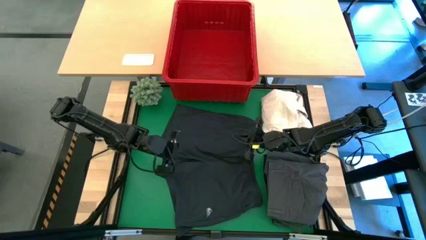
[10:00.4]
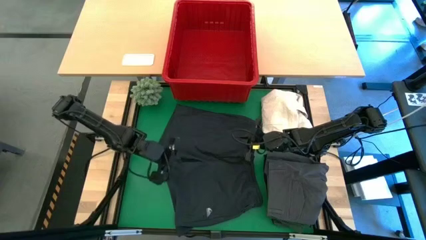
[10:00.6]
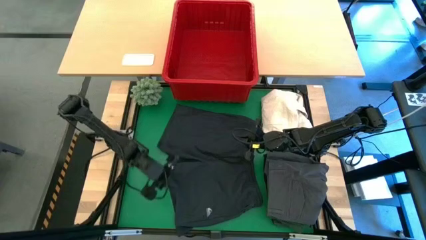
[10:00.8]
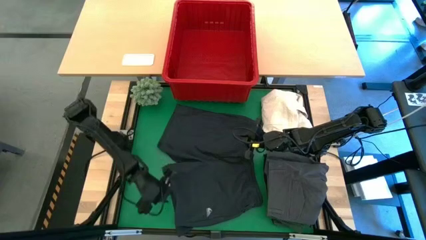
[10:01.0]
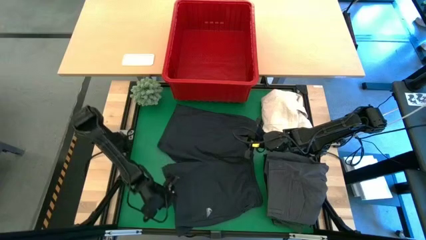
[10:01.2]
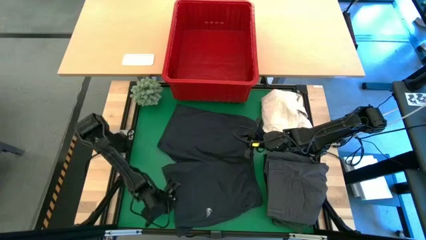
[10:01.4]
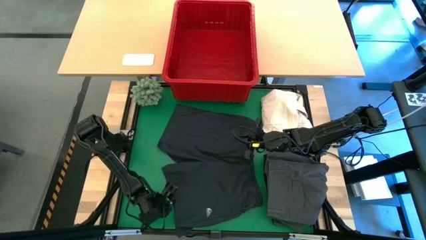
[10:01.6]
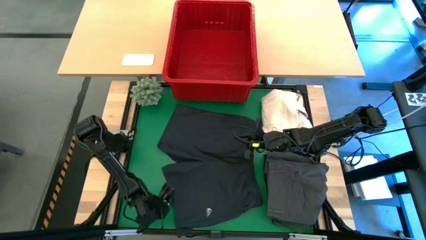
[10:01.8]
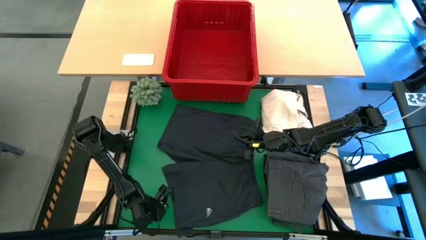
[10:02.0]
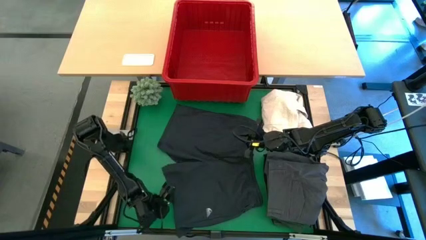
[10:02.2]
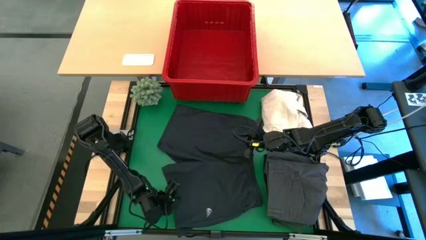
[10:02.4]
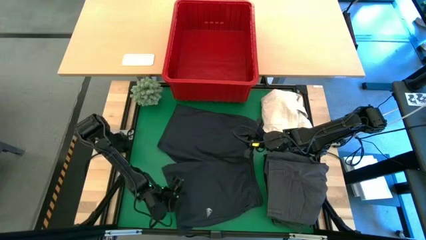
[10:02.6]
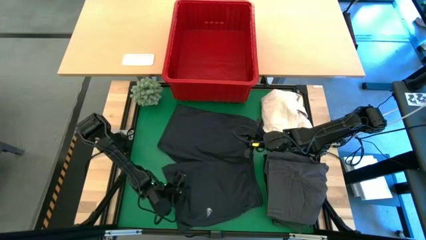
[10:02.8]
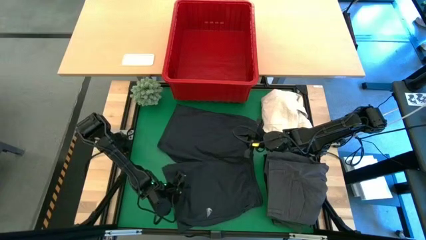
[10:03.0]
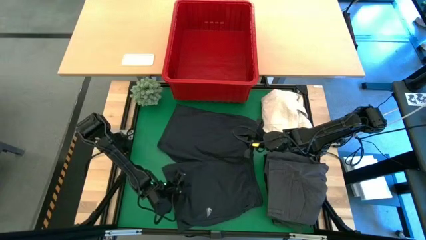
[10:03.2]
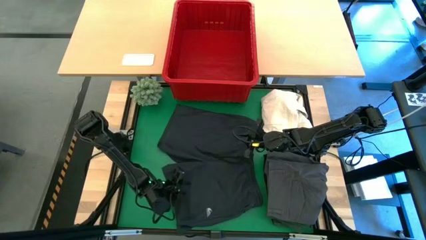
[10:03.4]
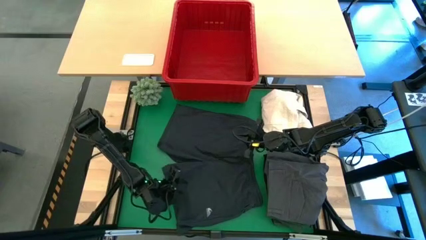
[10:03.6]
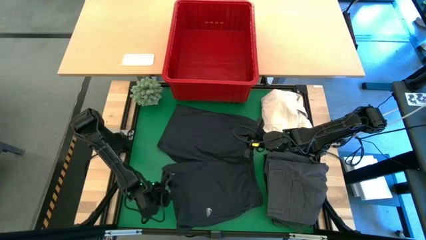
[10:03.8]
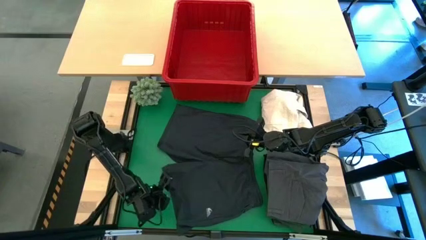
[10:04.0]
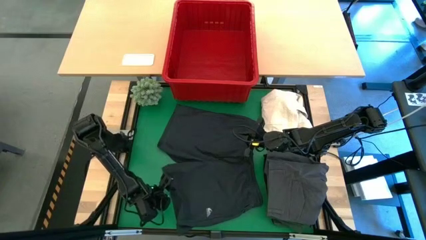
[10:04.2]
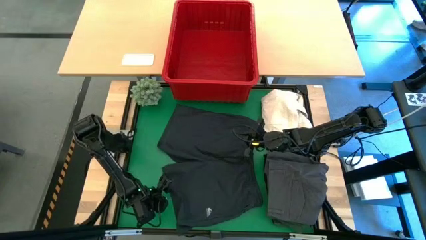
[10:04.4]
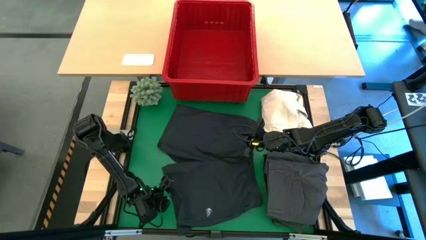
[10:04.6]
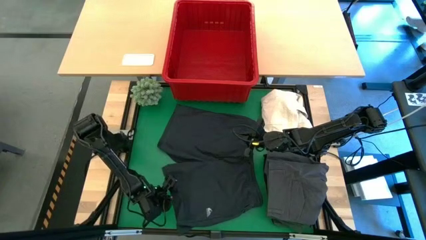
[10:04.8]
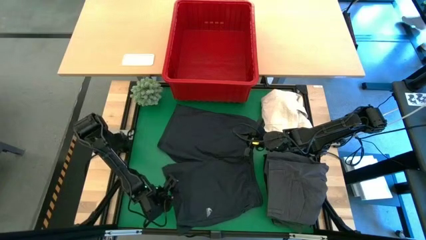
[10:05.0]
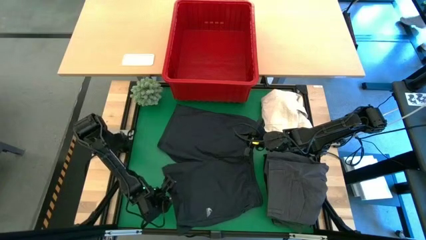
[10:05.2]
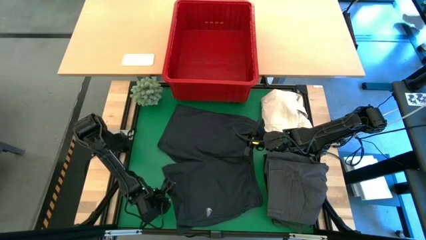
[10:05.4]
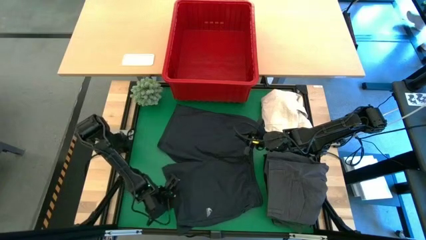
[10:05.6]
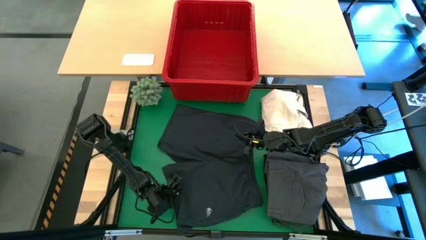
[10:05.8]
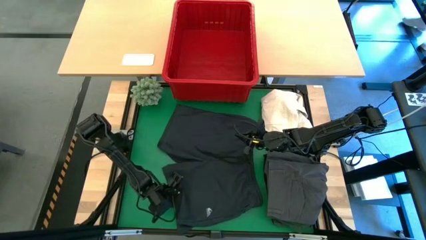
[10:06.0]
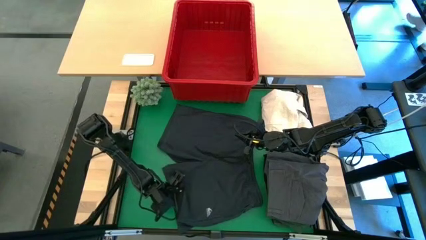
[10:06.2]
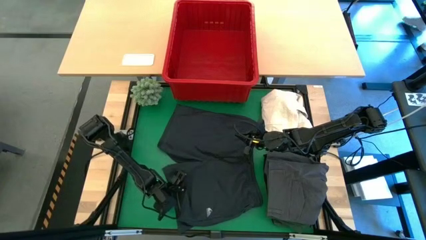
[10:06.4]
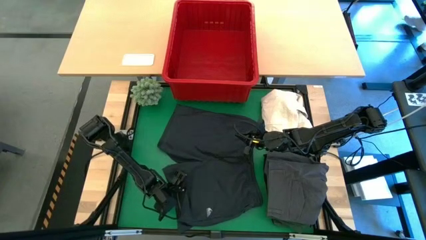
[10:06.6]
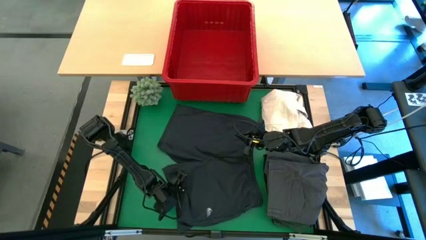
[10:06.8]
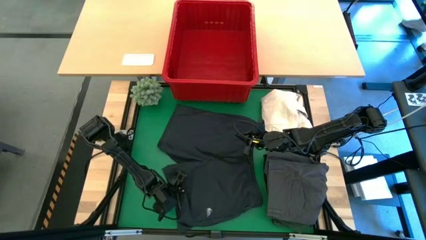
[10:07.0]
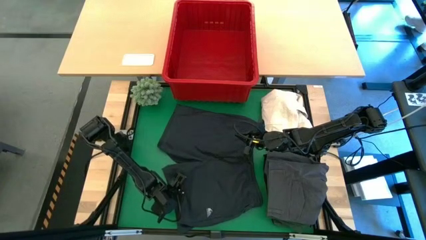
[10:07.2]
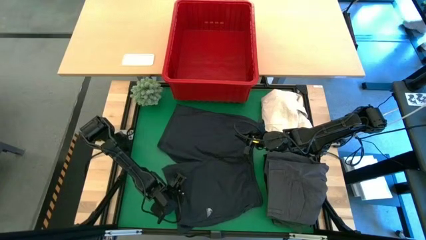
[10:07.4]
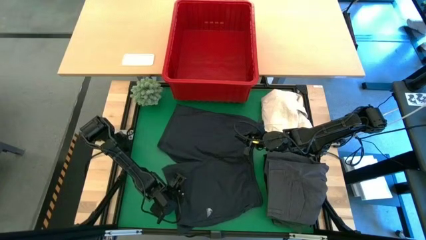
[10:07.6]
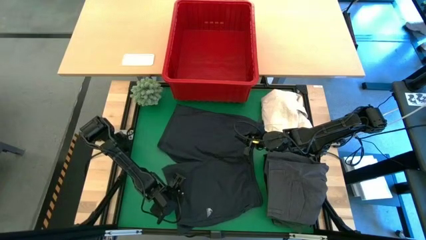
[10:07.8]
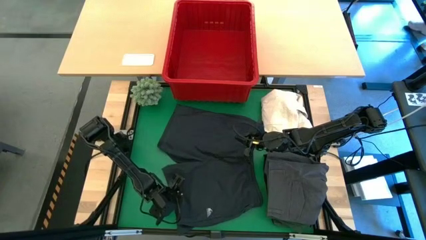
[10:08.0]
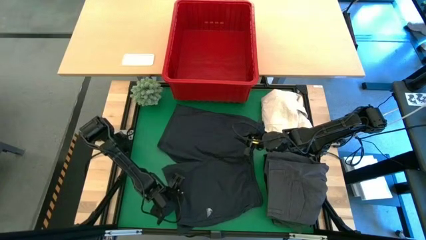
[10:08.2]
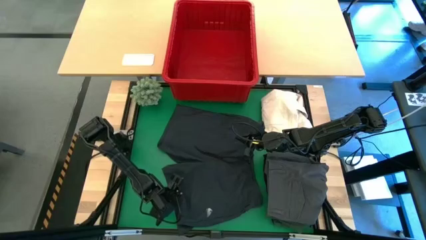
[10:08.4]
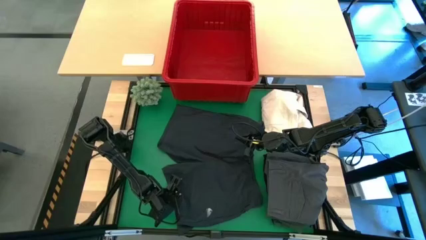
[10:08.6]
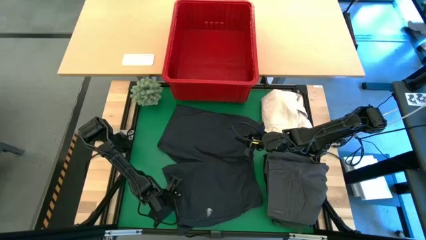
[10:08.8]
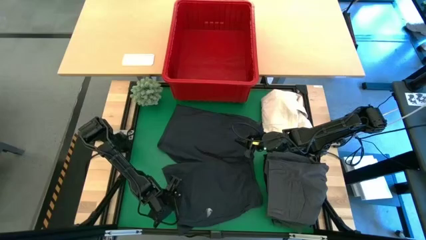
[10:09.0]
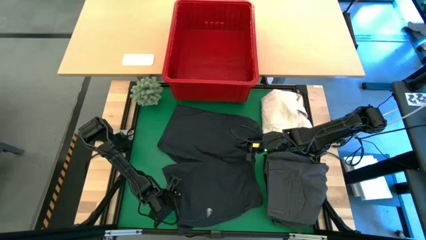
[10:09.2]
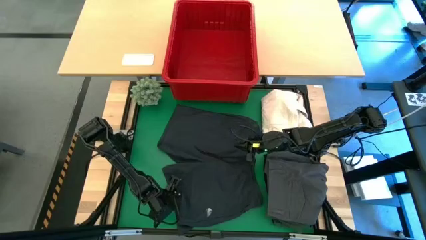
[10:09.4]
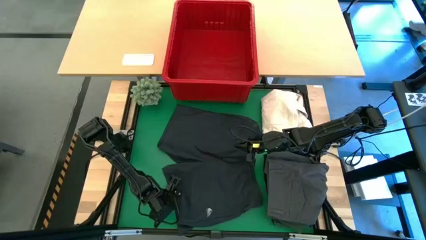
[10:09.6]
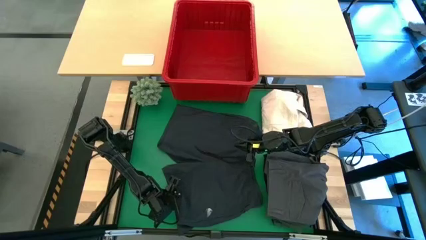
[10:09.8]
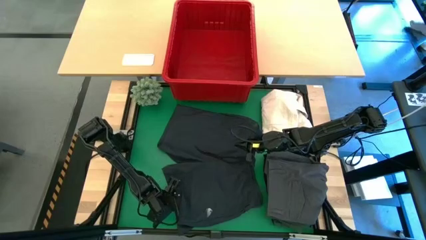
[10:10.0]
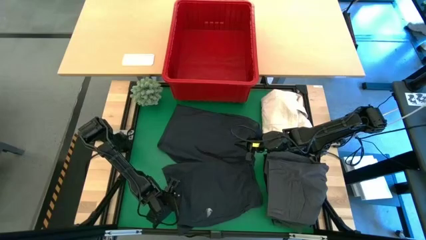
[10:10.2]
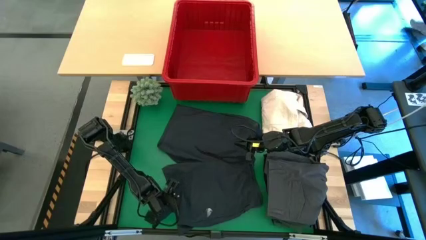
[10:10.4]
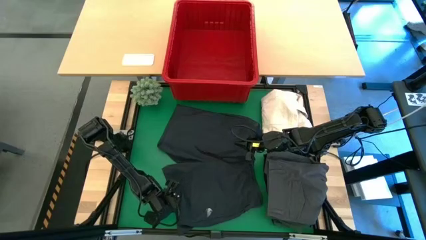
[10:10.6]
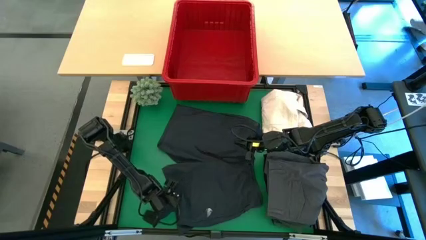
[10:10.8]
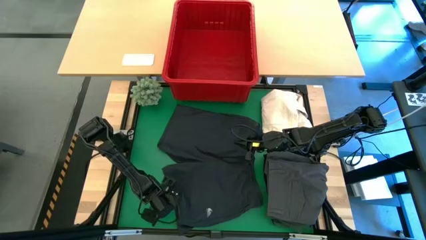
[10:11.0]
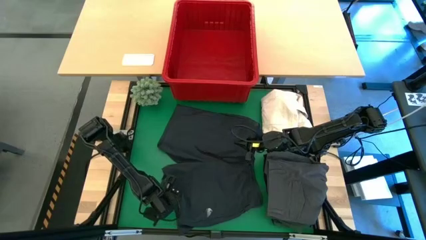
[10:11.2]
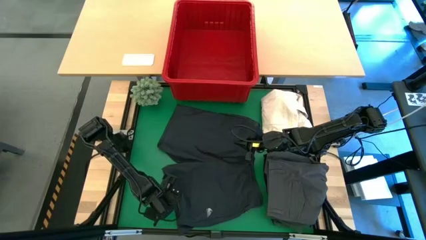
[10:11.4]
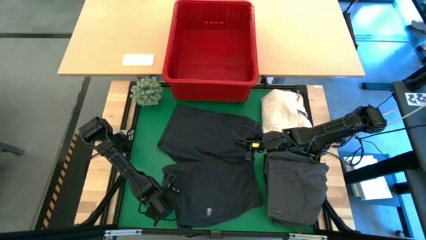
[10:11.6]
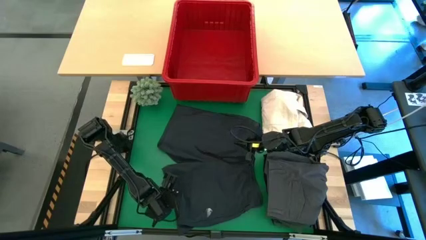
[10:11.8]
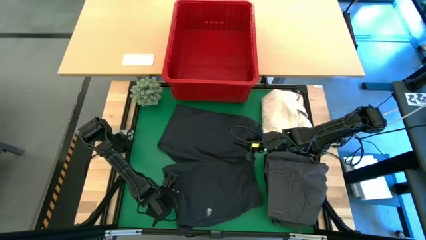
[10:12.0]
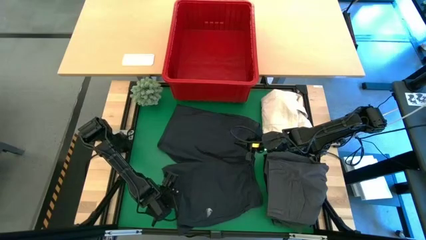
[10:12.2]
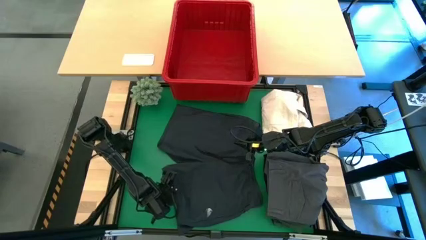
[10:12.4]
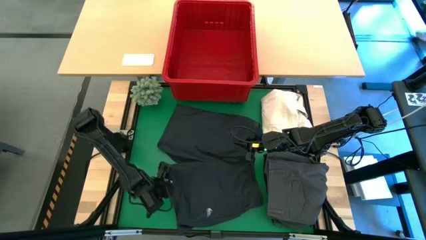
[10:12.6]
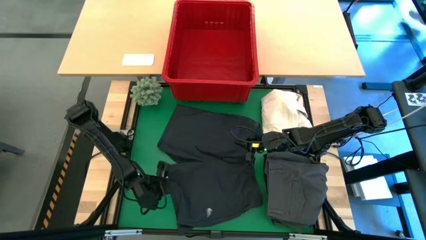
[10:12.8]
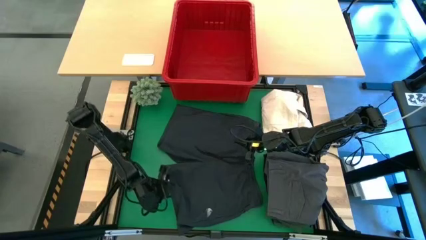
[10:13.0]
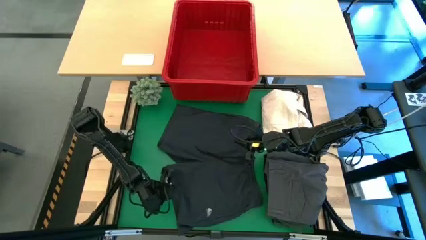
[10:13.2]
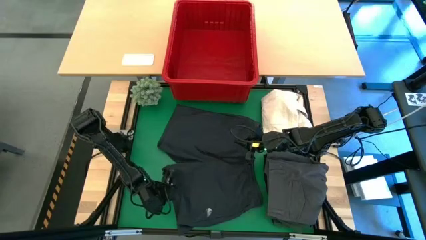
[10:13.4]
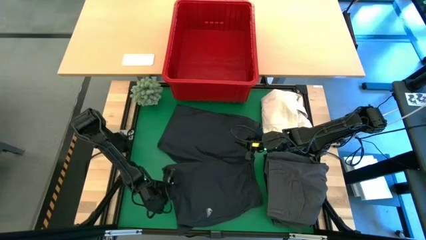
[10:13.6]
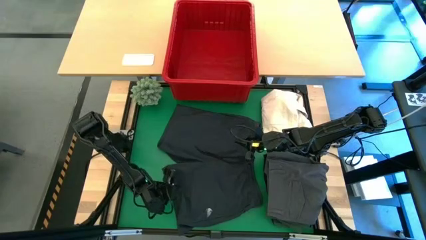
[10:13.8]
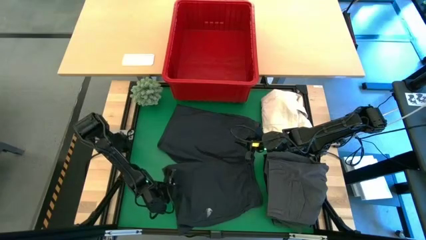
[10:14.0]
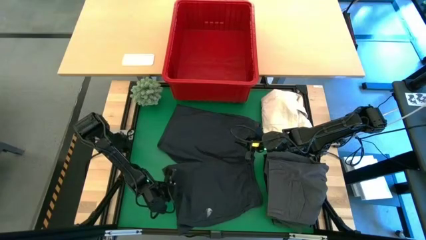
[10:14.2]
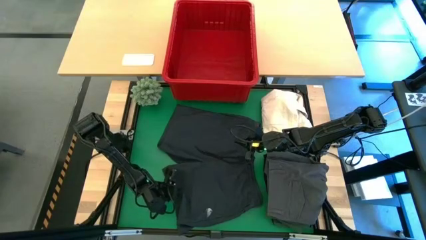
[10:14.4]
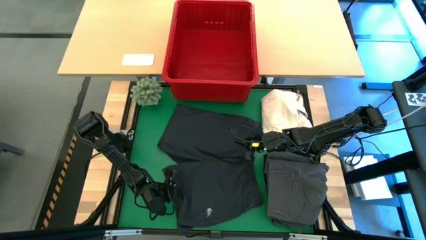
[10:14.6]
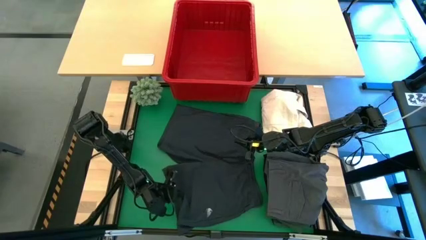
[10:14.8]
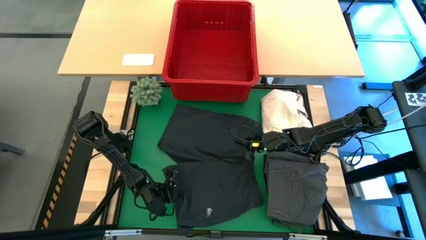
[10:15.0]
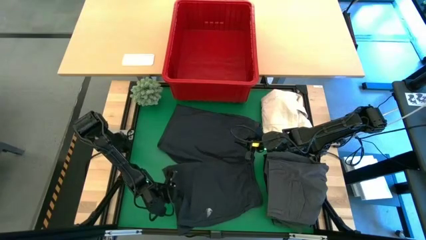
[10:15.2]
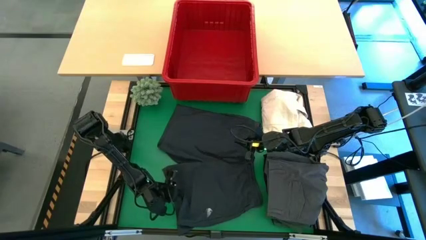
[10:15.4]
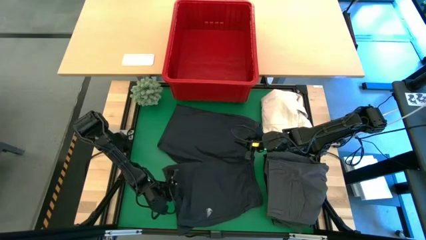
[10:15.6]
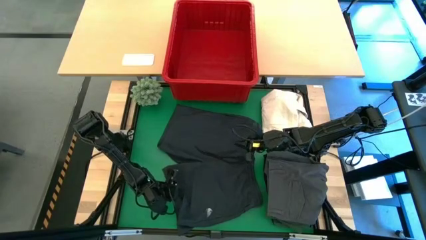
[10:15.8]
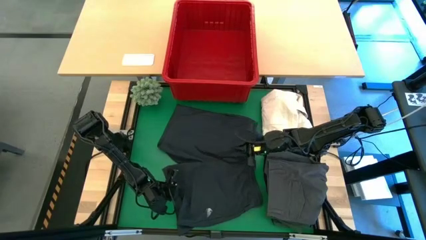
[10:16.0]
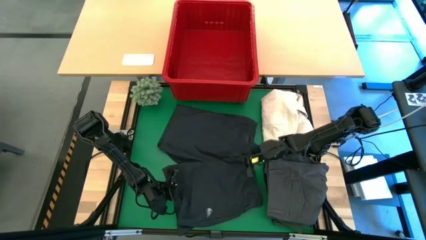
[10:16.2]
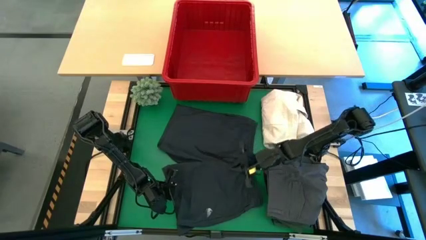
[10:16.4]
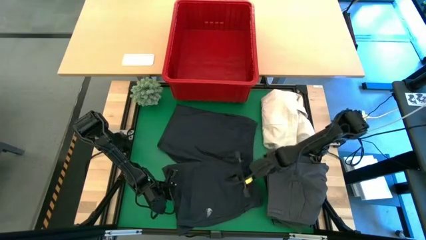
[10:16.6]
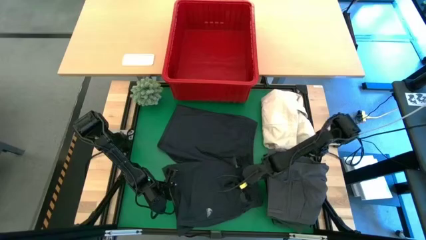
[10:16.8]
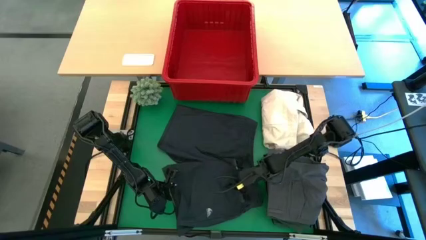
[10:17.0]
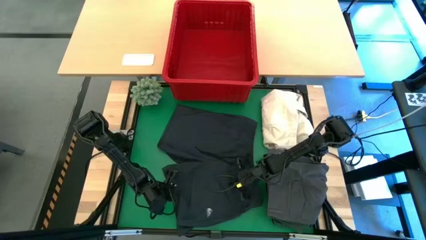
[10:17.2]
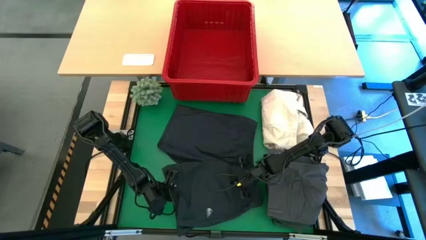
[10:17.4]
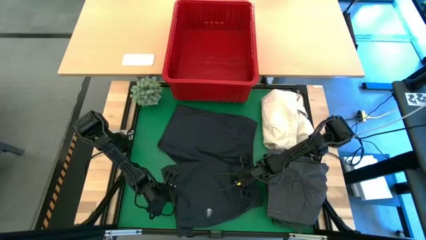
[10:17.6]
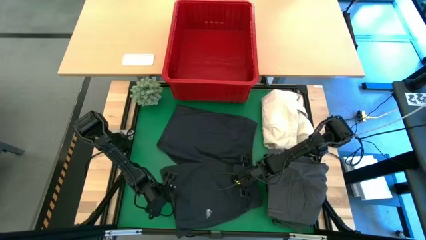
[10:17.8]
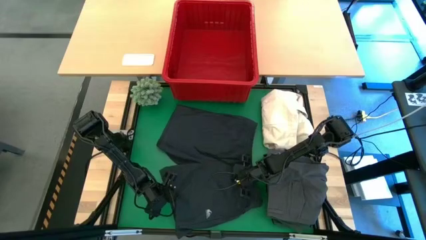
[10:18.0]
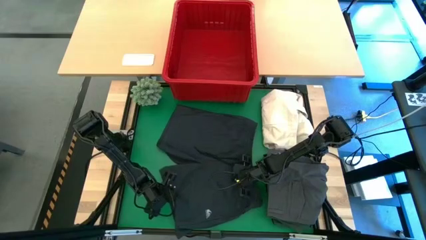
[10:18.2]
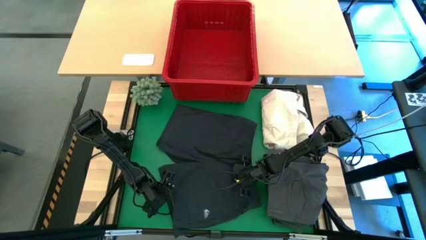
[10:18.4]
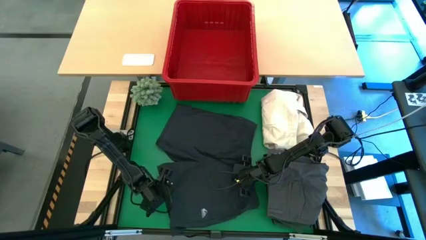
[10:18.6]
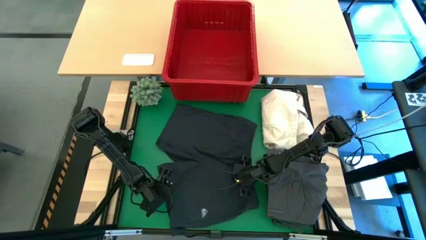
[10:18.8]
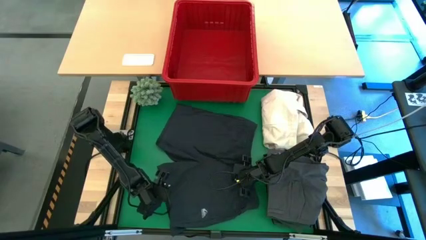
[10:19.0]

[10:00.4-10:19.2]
Task: Fold laundry
Fold the gray short
